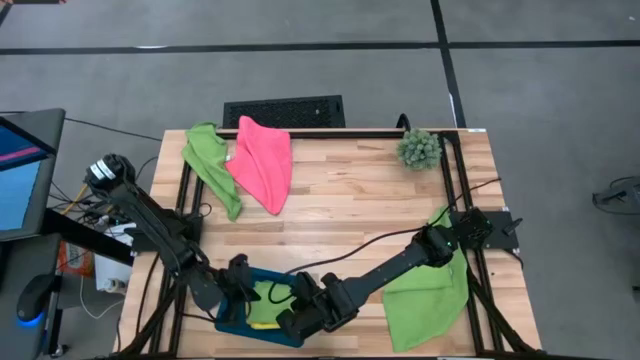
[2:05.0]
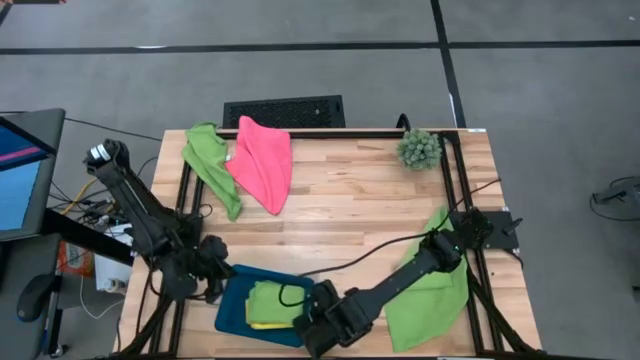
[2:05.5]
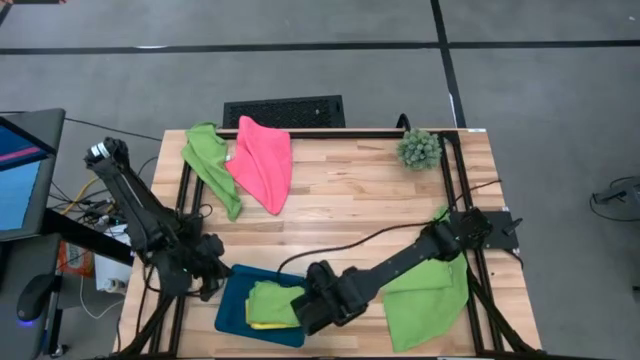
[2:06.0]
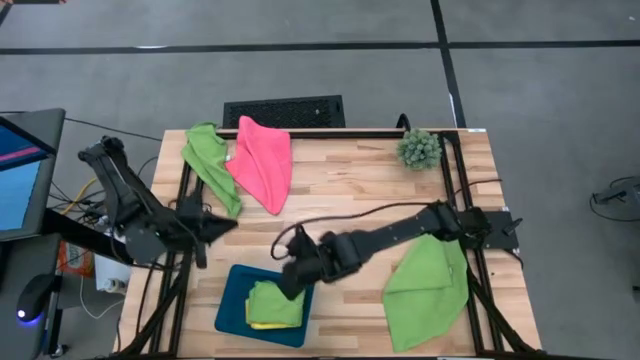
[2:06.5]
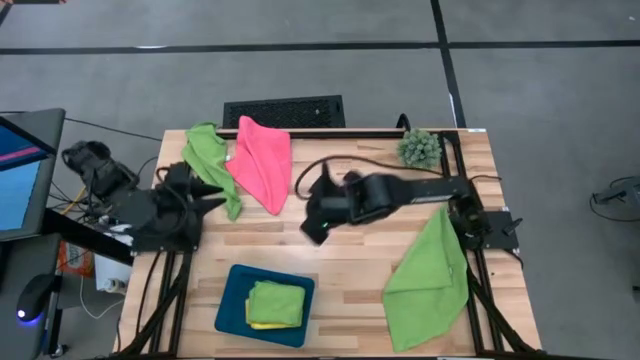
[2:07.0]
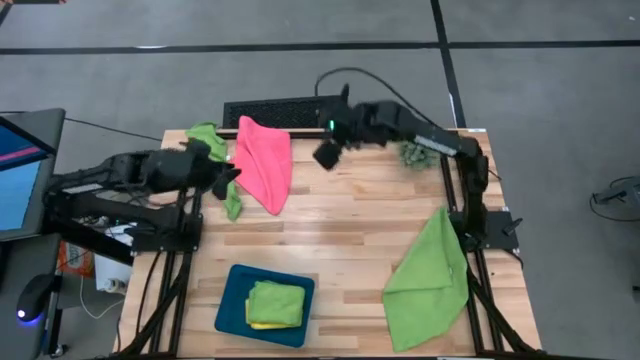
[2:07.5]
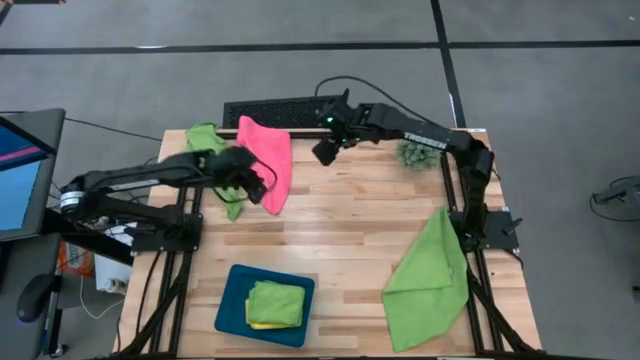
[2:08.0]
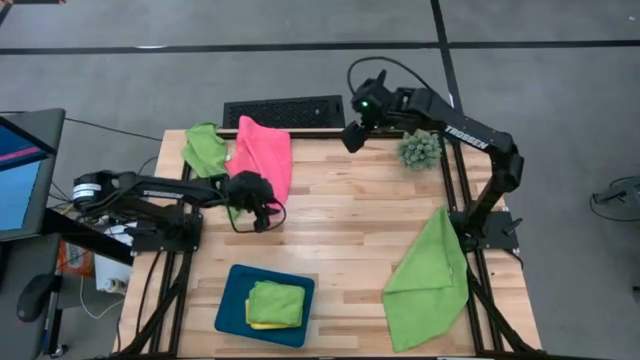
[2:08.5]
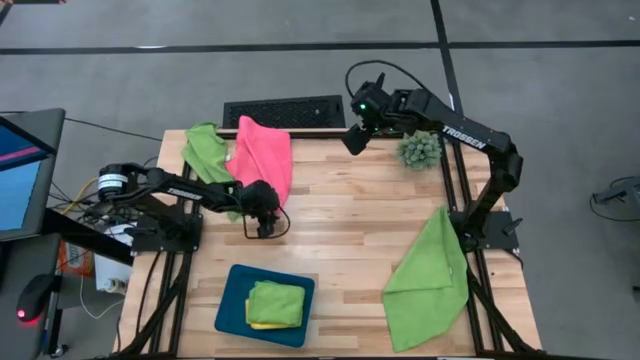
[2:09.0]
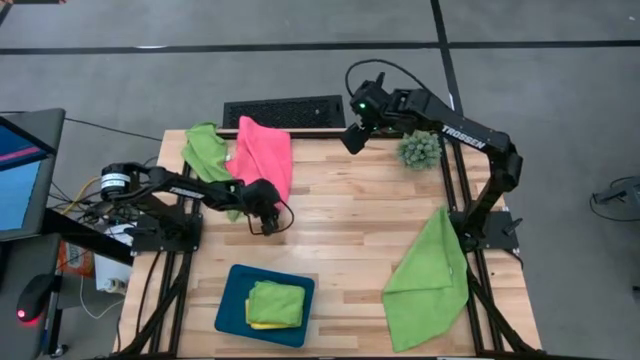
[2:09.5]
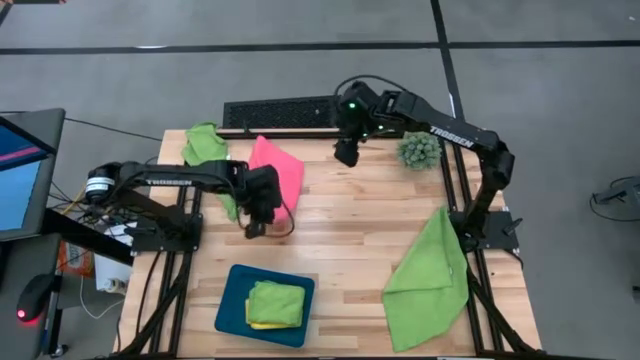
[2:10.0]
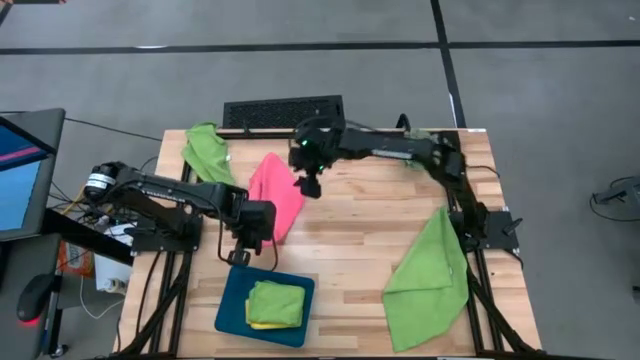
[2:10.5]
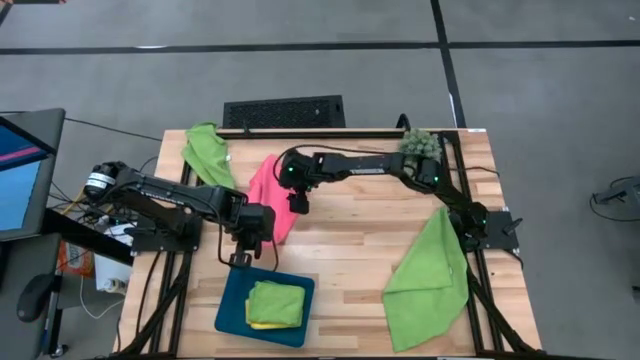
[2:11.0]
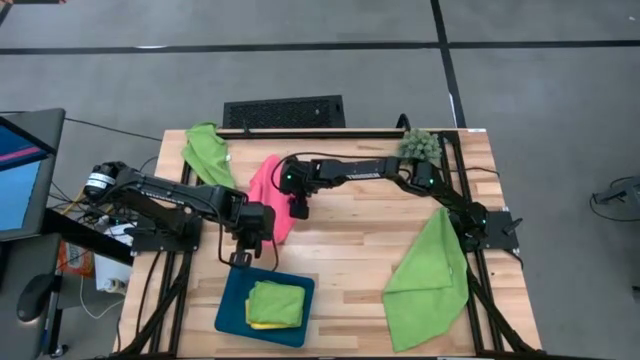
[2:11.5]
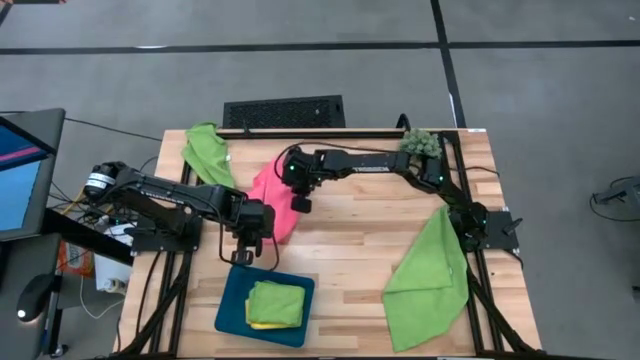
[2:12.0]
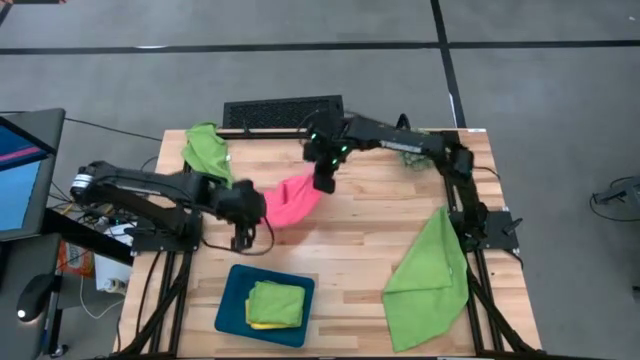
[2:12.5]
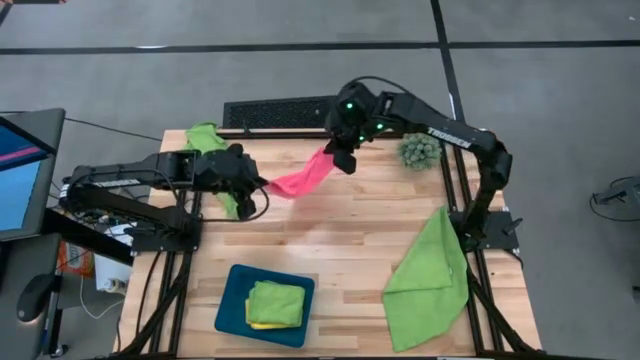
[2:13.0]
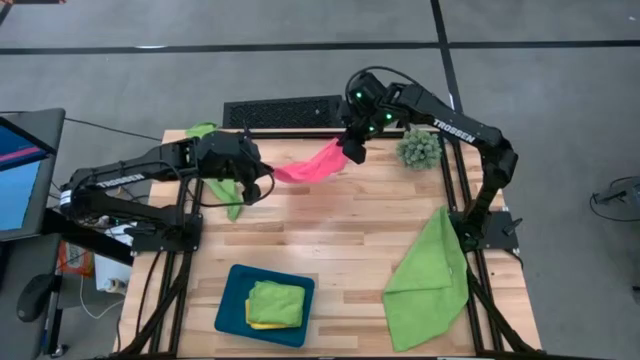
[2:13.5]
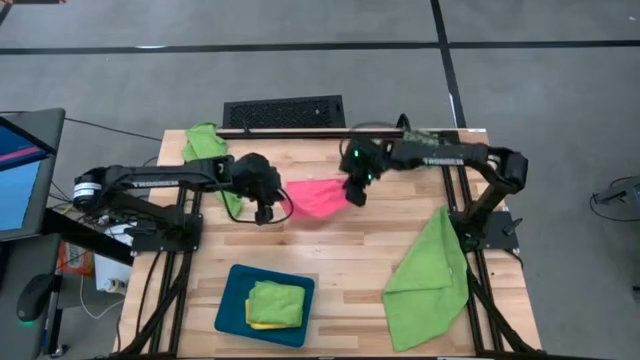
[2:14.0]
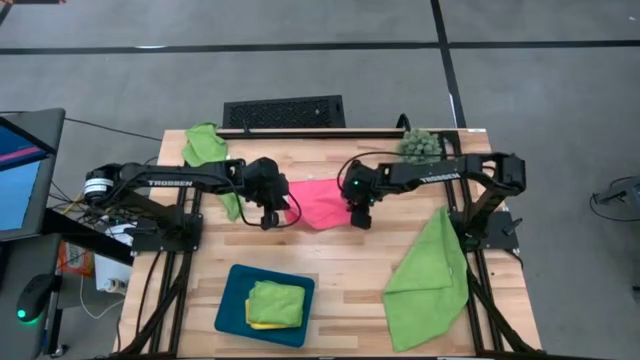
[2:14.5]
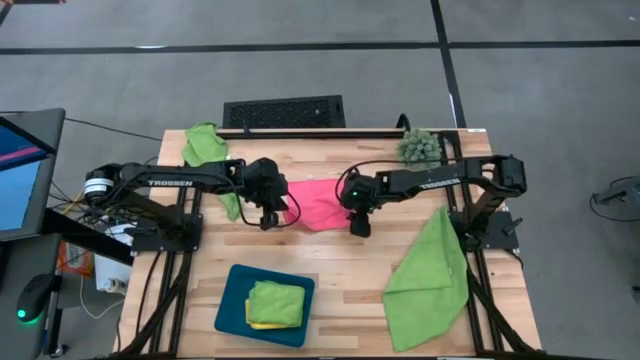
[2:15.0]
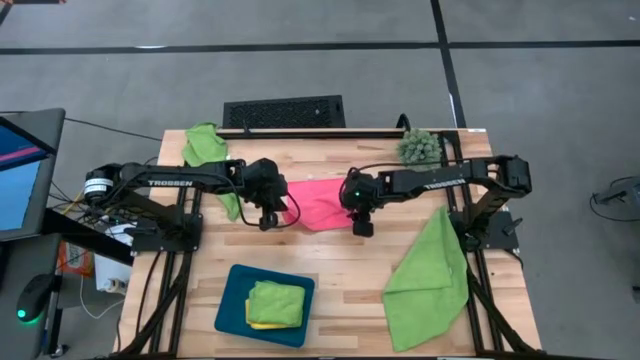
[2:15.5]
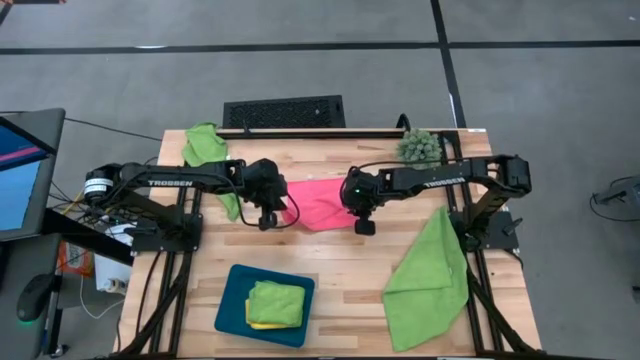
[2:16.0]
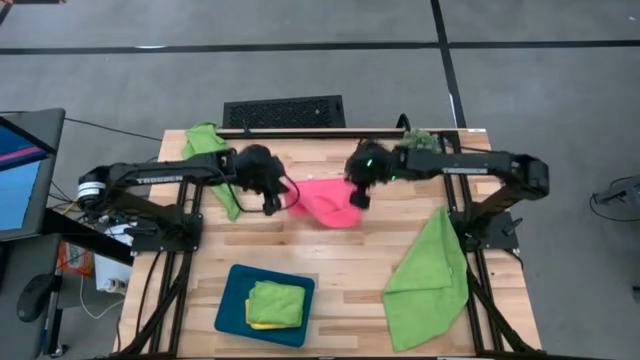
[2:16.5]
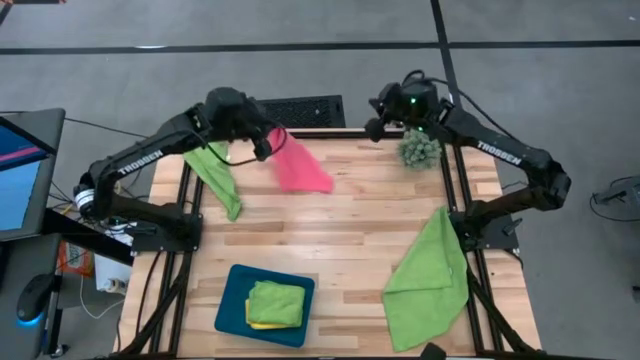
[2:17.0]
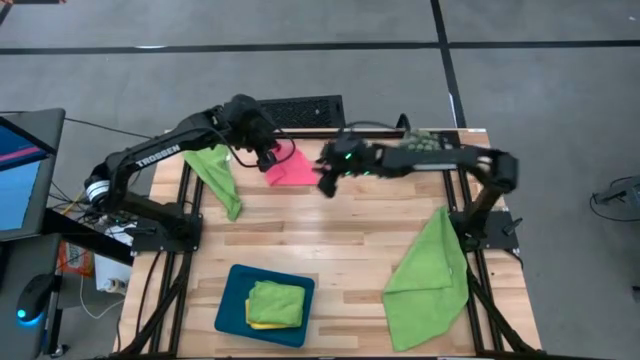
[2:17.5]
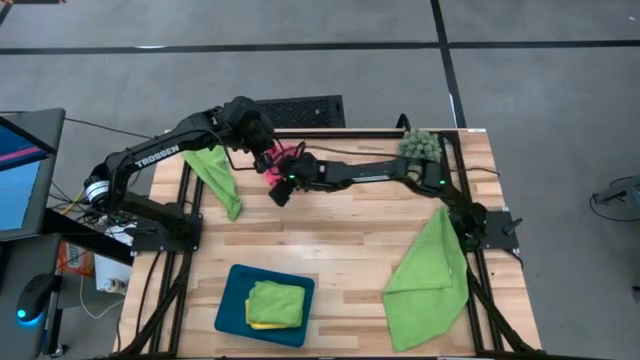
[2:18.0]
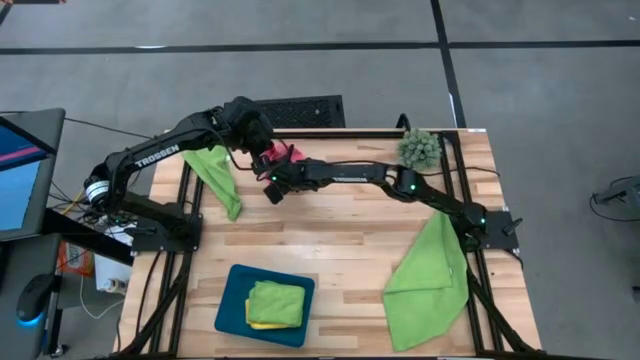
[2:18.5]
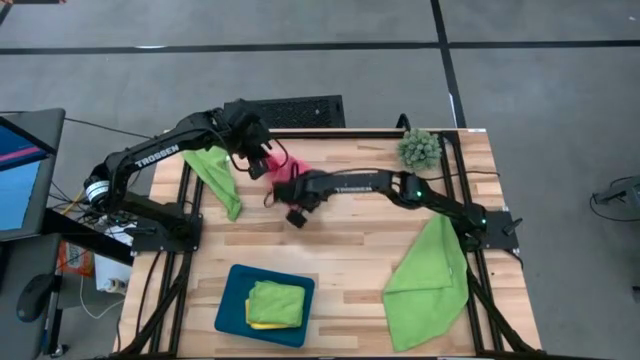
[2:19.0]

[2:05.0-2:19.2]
Task: Fold microfiber towels
Fold the pink microfiber towel on the table

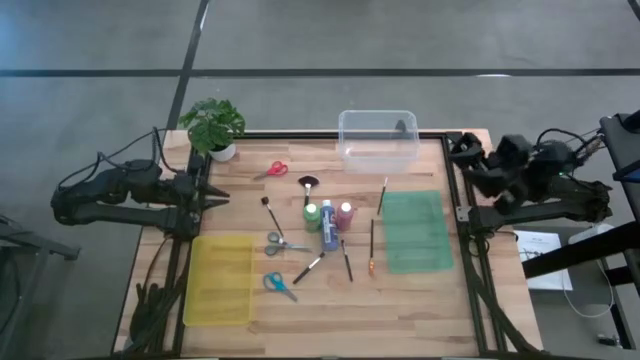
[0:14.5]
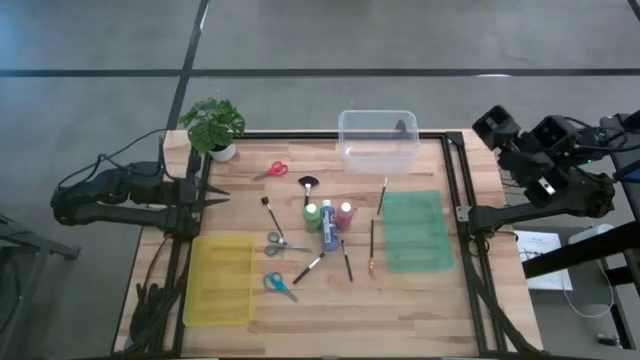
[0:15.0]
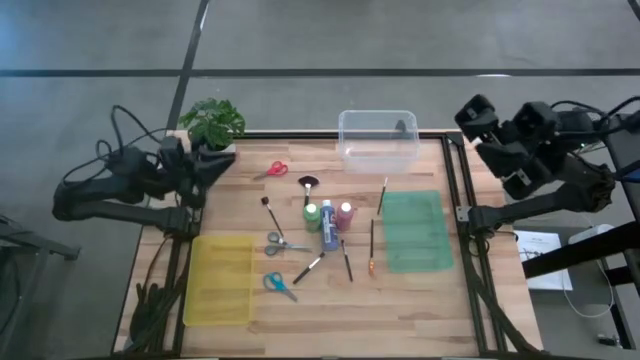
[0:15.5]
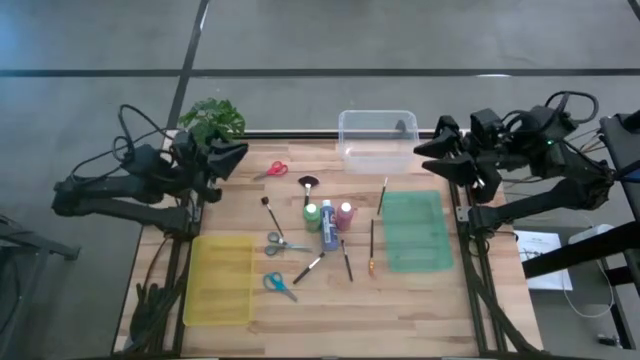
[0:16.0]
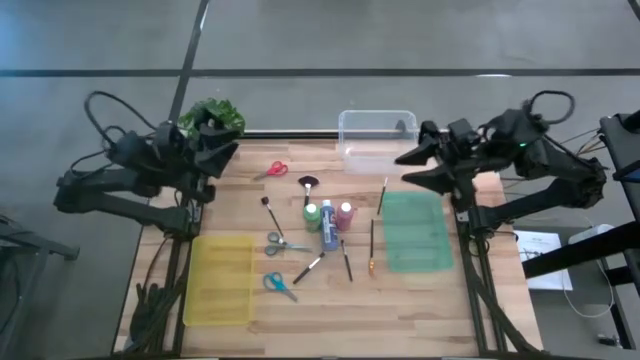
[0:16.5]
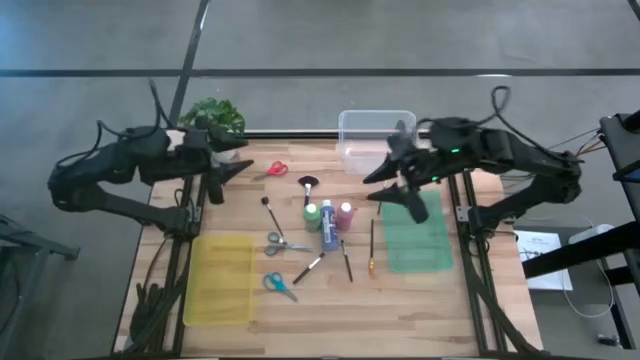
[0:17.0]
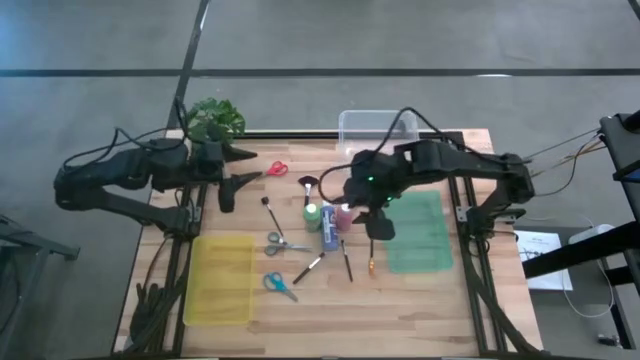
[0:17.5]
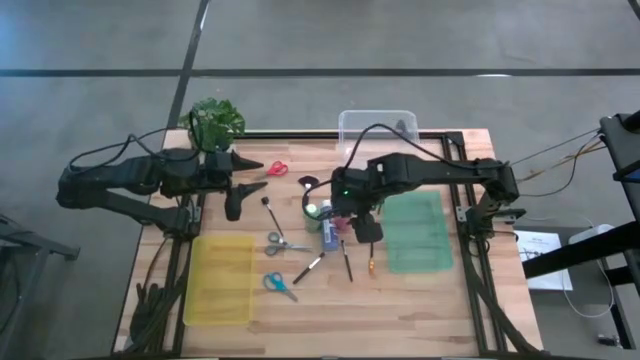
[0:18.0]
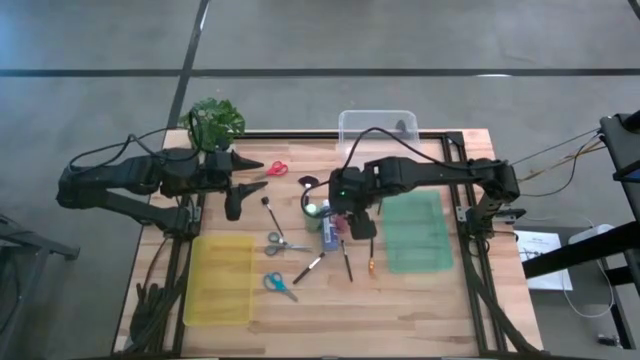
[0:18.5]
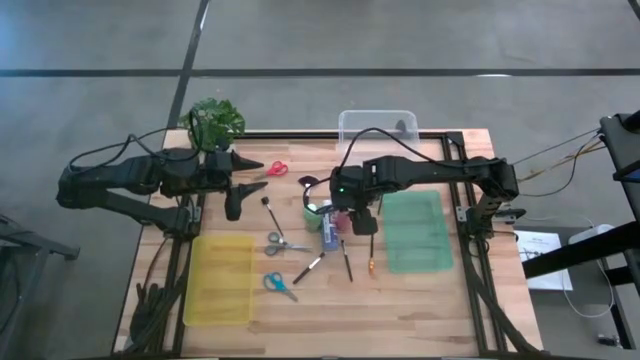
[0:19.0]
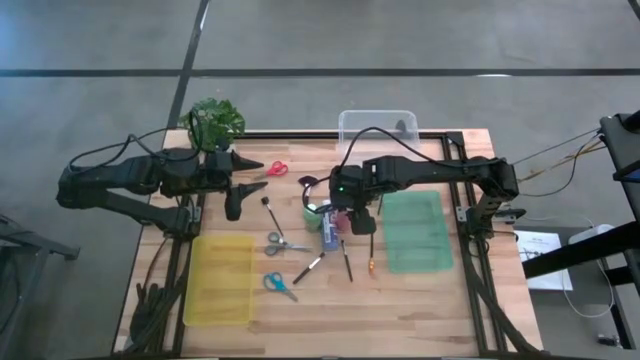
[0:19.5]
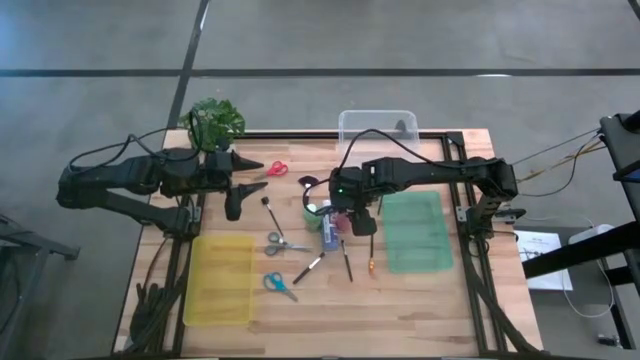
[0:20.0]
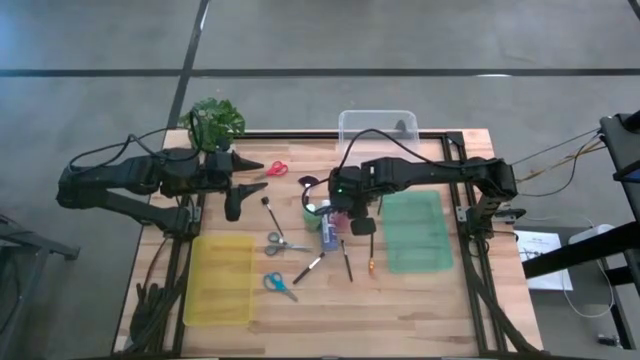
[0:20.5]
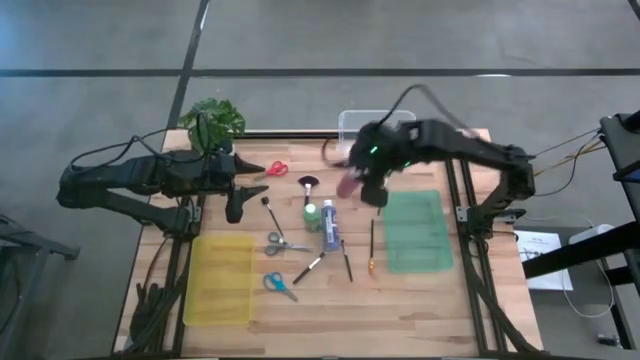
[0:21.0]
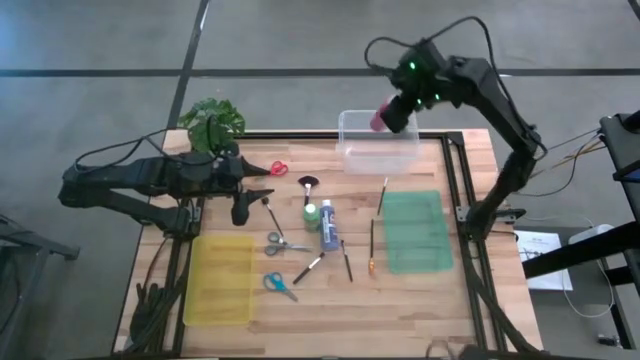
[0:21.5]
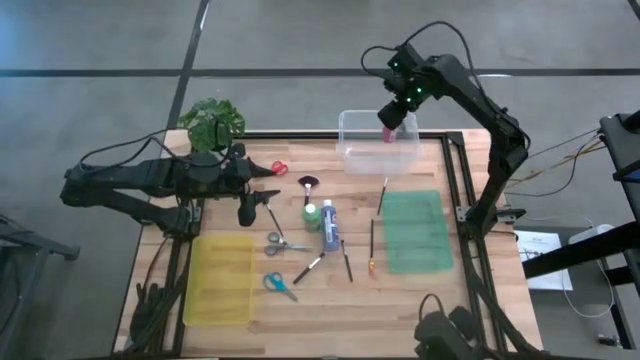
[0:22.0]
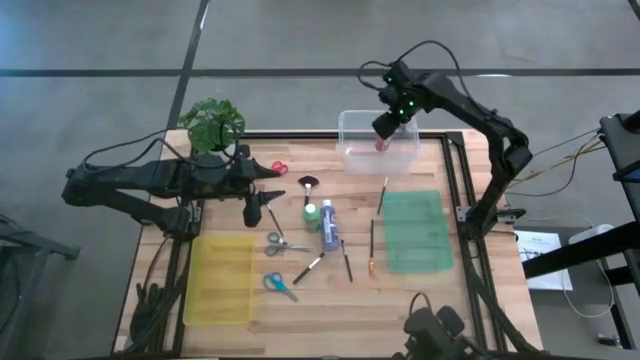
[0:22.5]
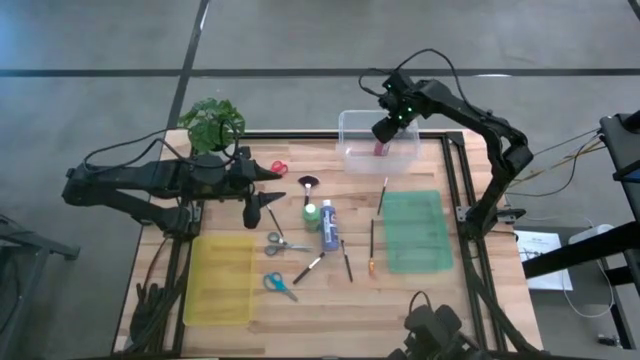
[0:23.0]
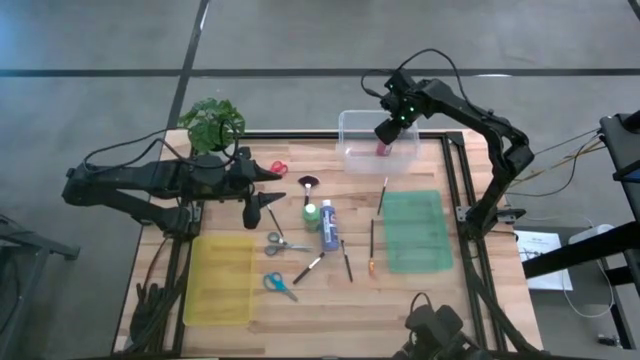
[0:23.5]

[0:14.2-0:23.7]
Task: Pick & Place Paint Supplies
Put the red paint bottle into the transparent bin
